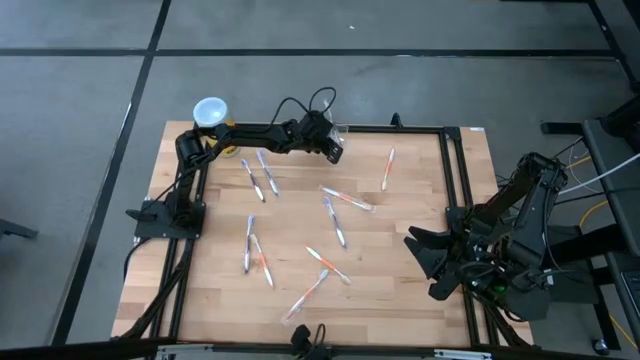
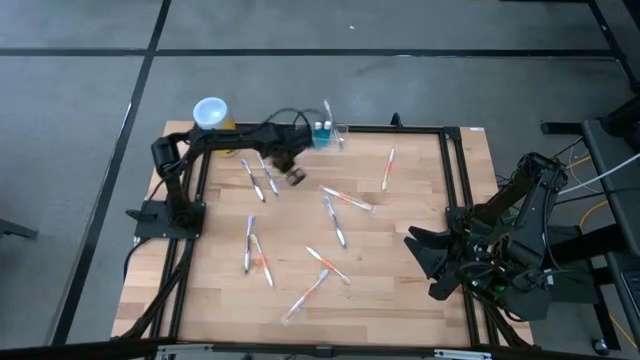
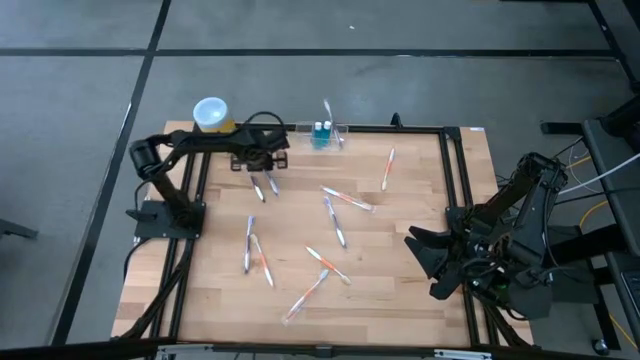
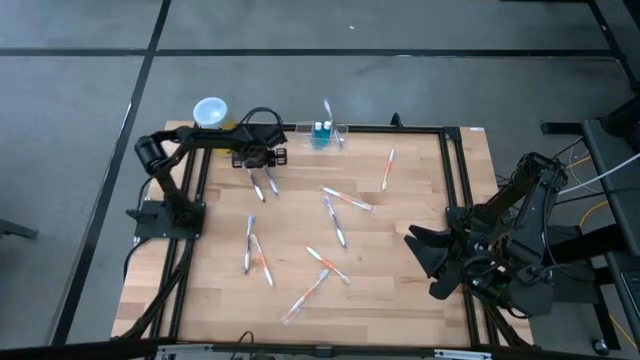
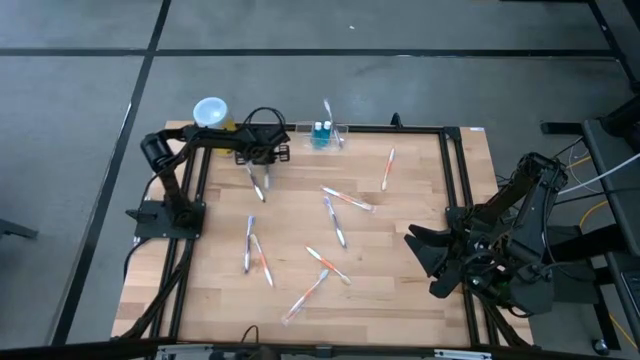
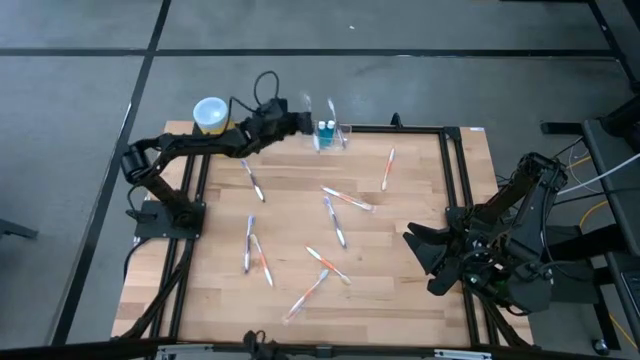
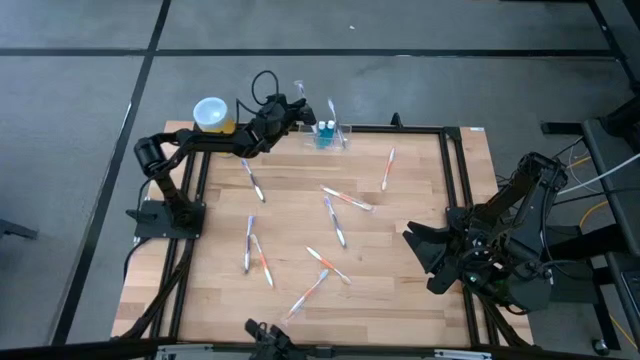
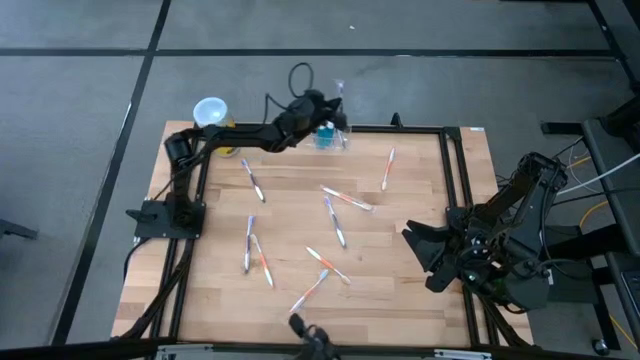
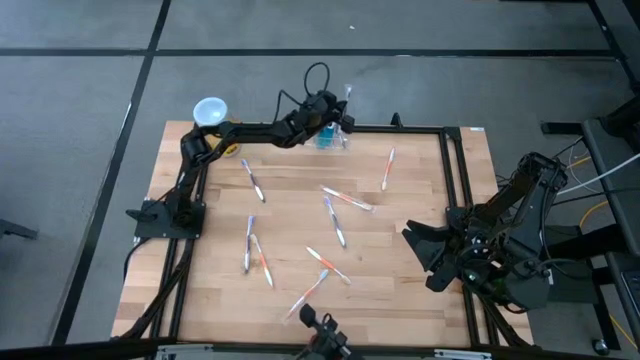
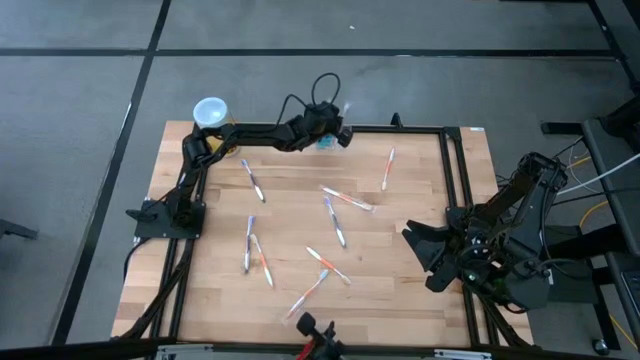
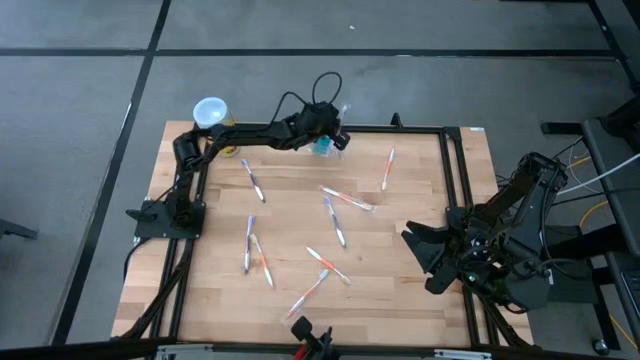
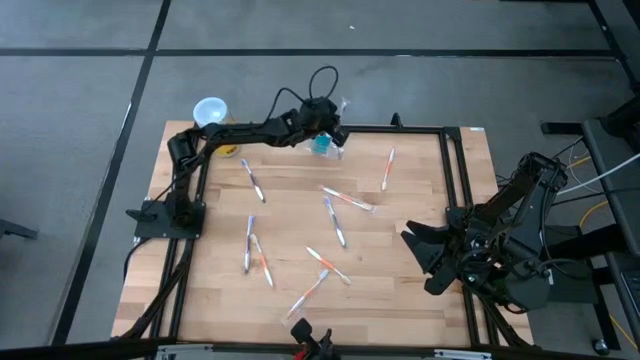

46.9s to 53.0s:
Task: Pick & Place toothbrushing station
Put the purple toothbrush into the right section of the transparent organizer

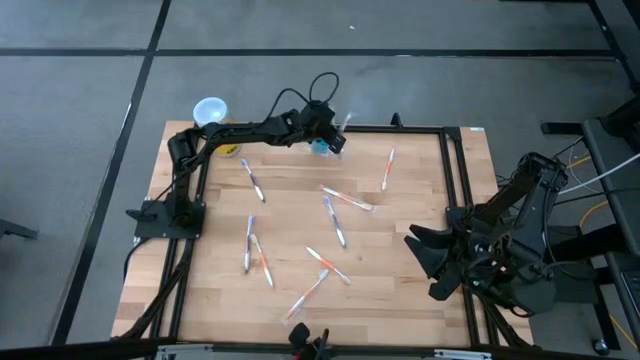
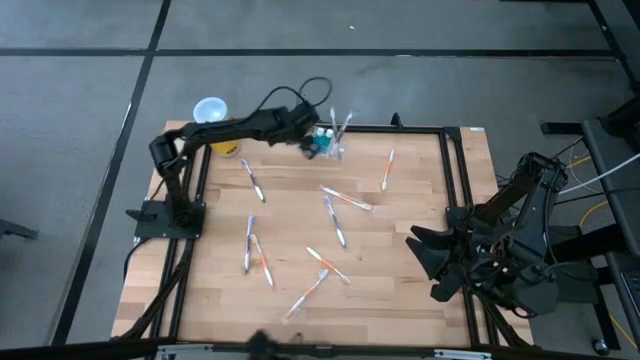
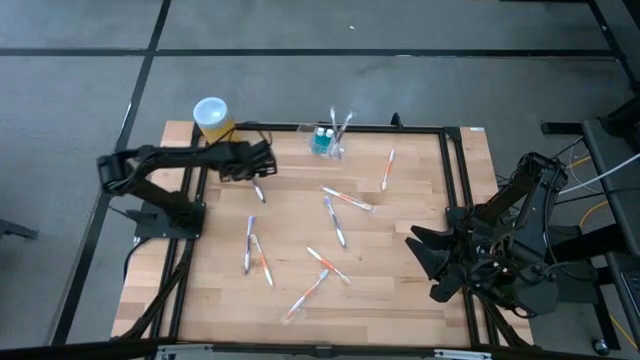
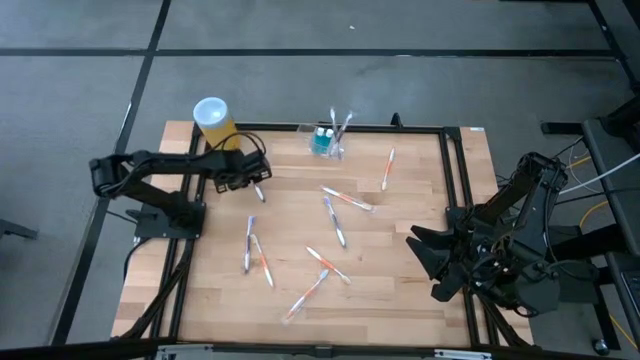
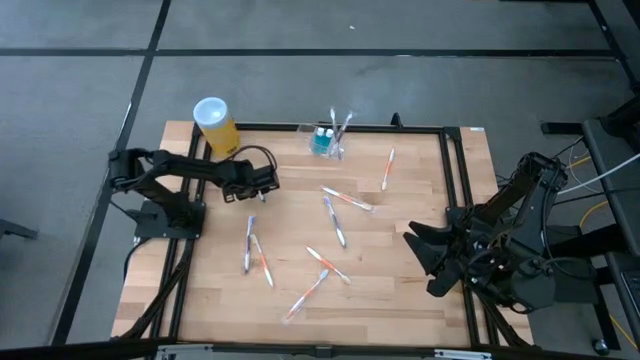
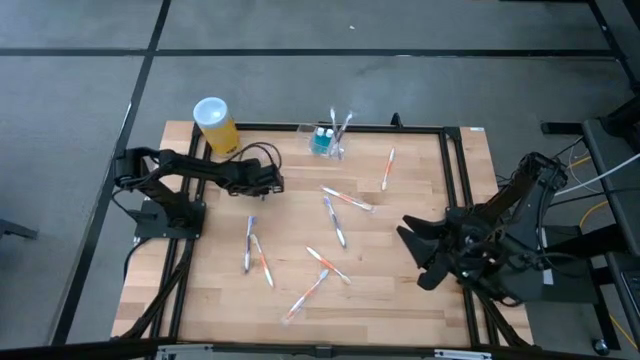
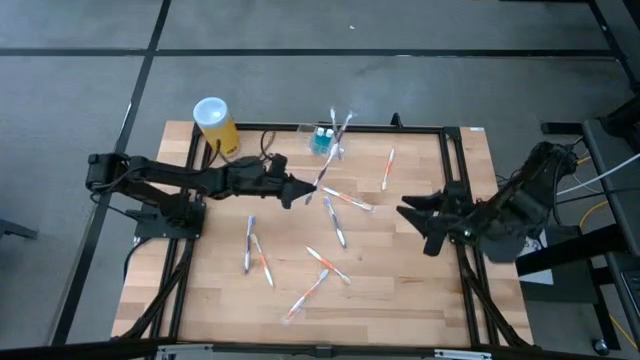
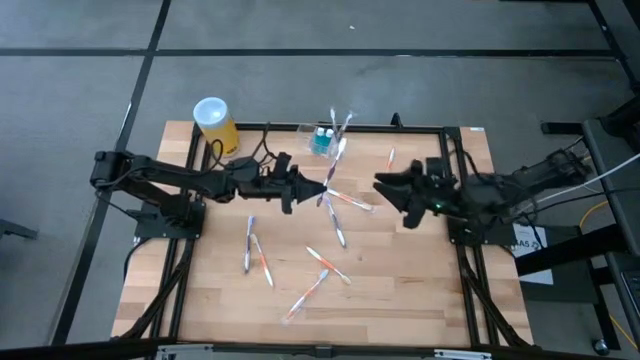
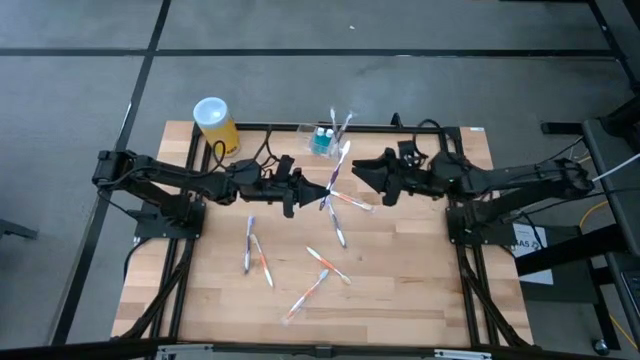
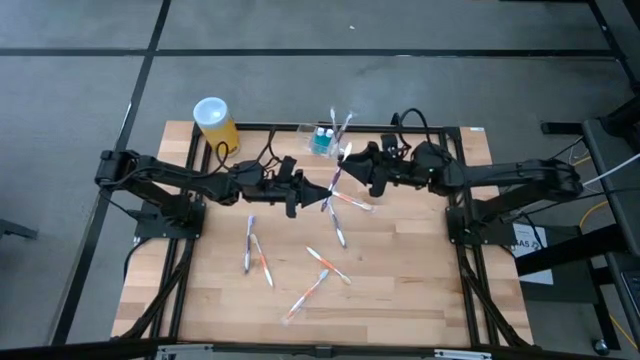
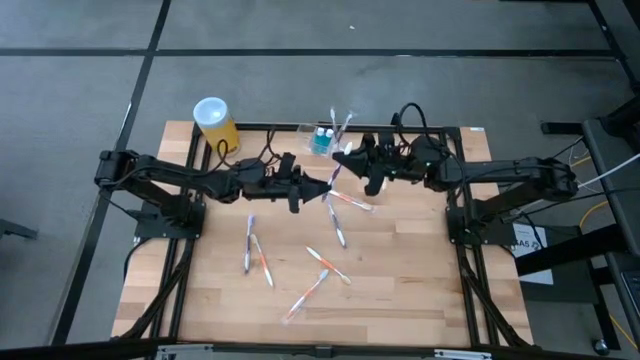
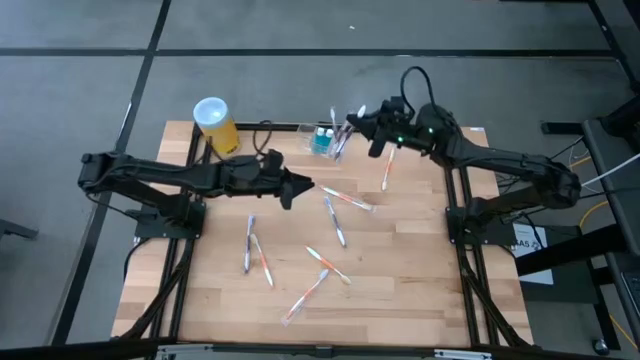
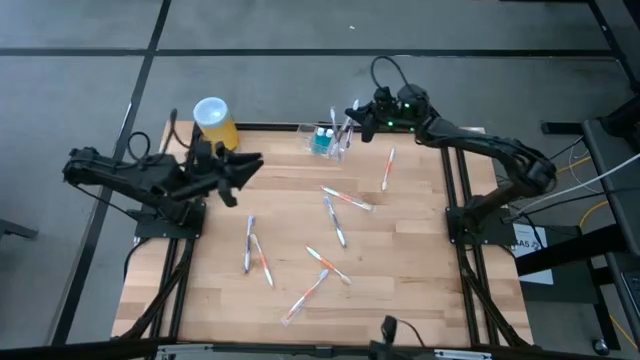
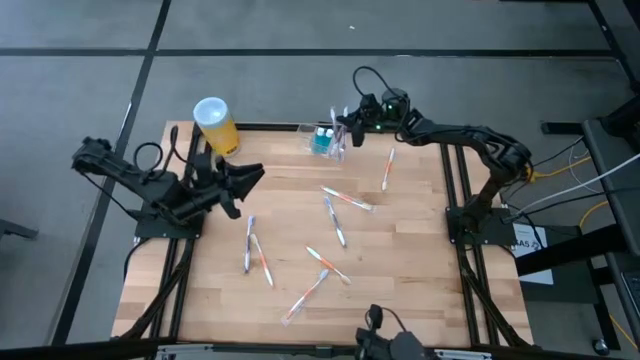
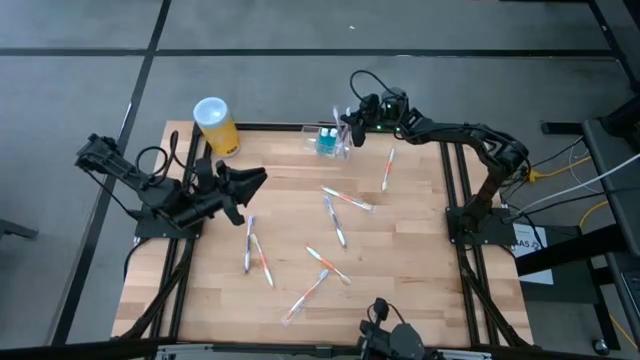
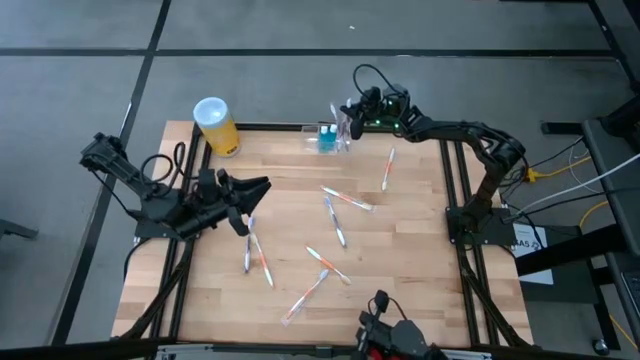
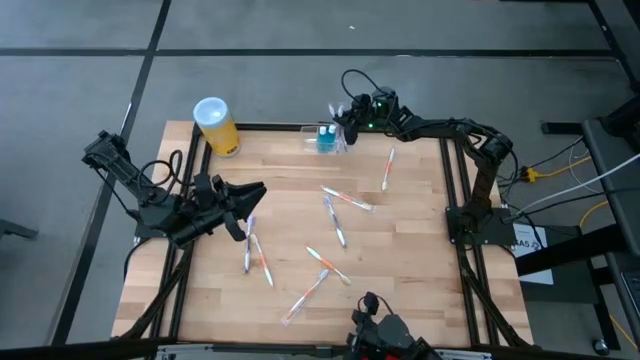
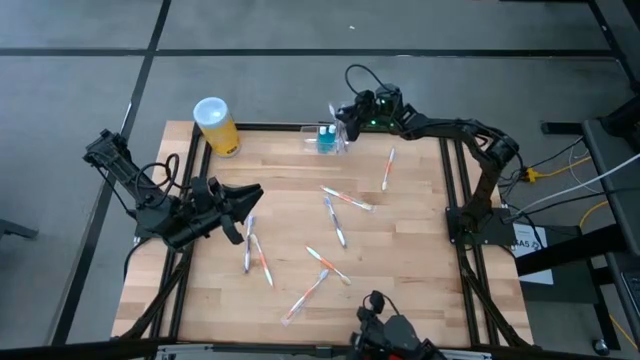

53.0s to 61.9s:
Put the purple toothbrush into the right section of the transparent organizer

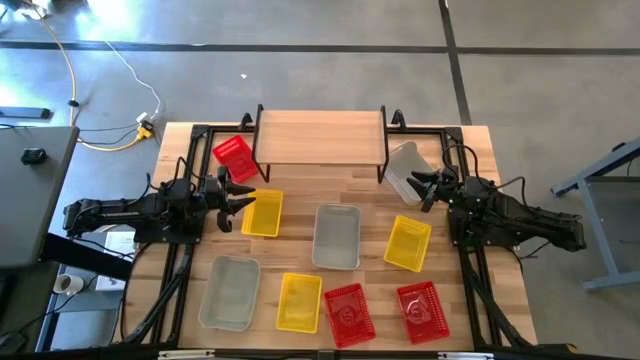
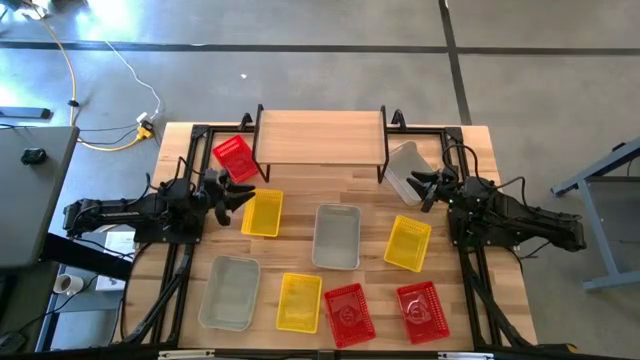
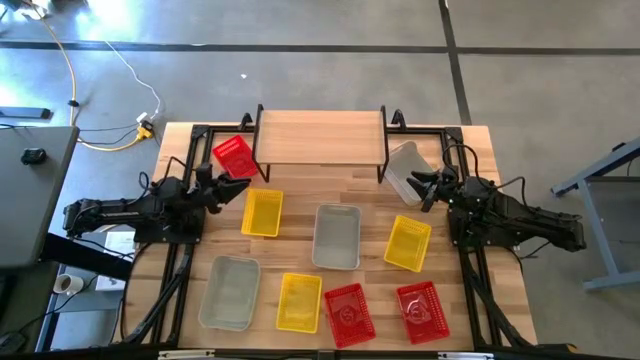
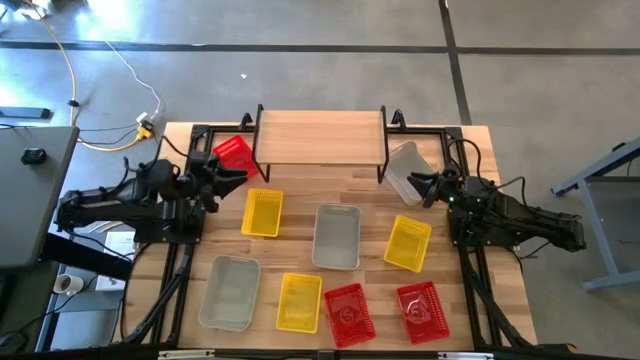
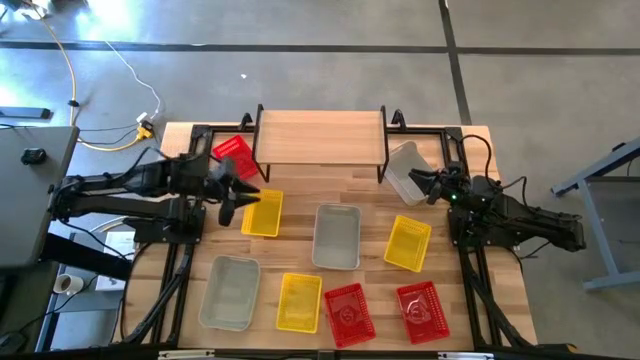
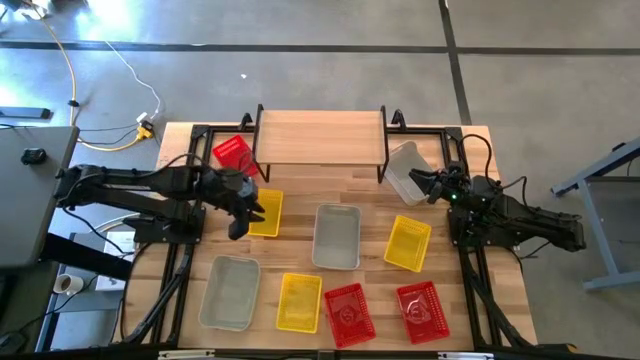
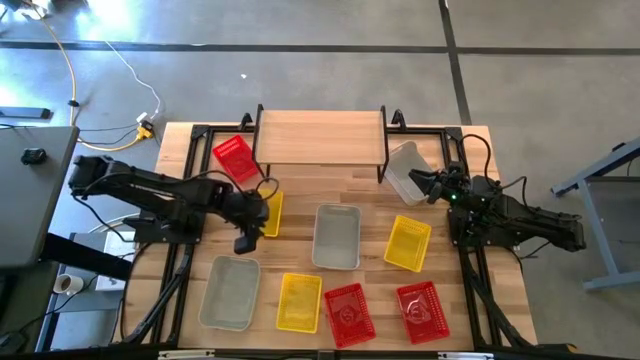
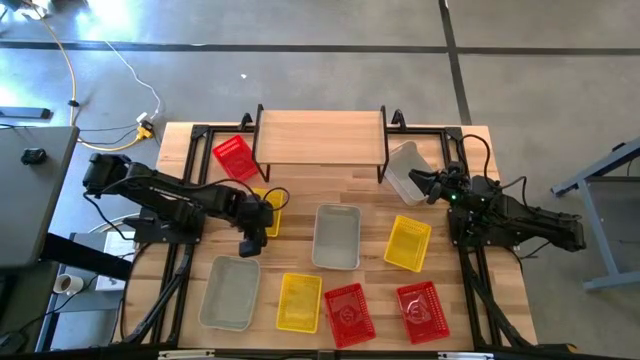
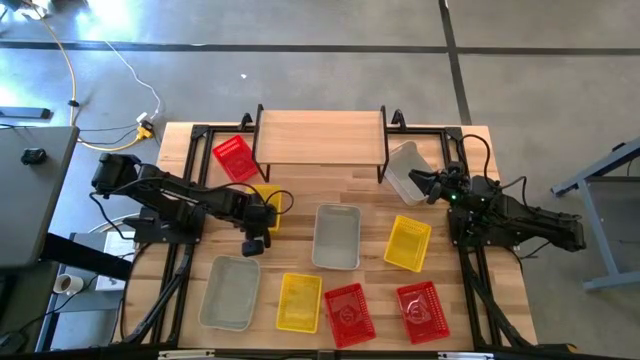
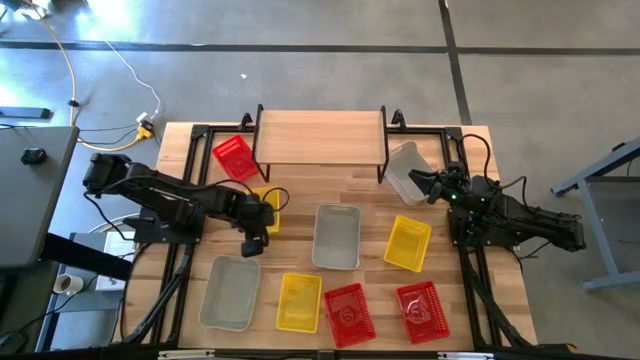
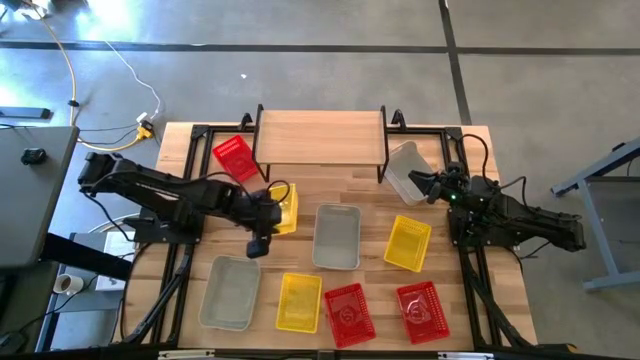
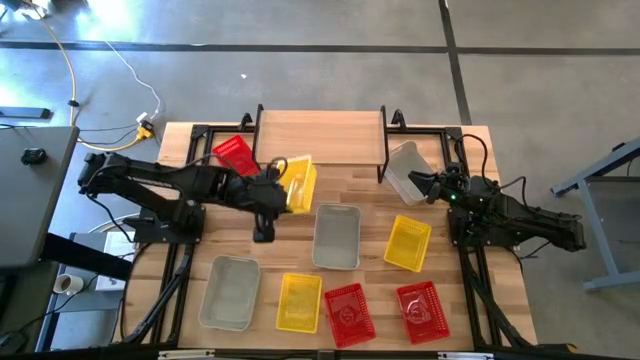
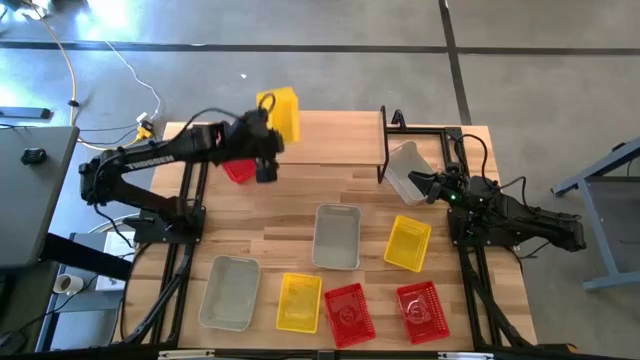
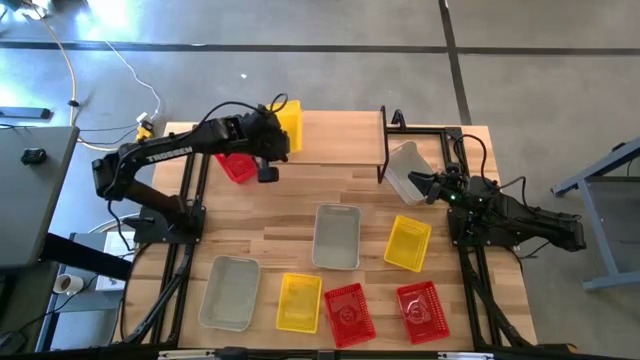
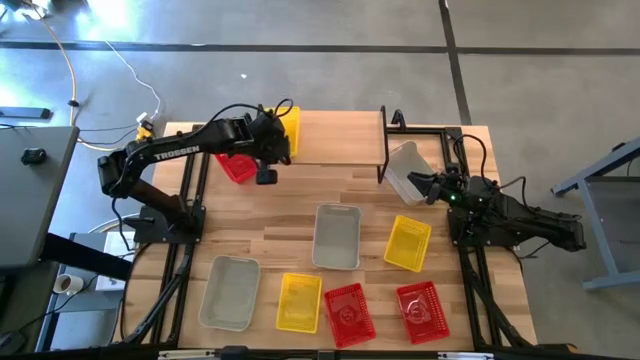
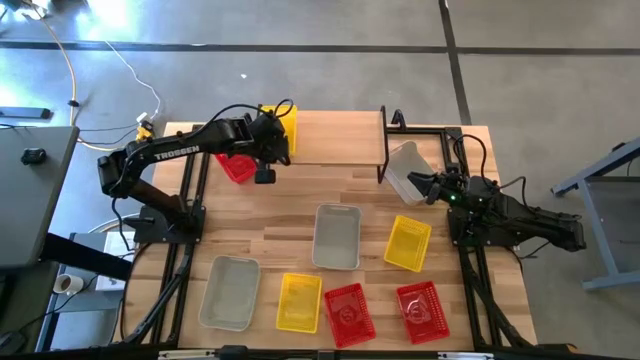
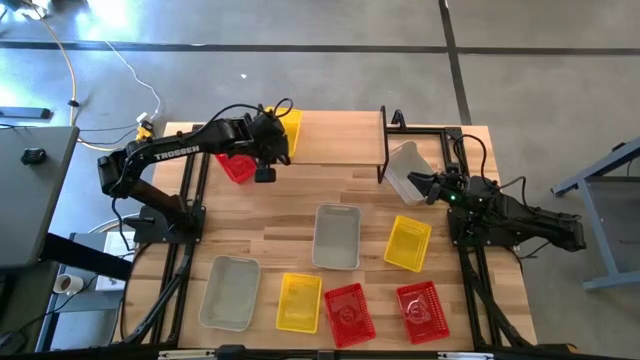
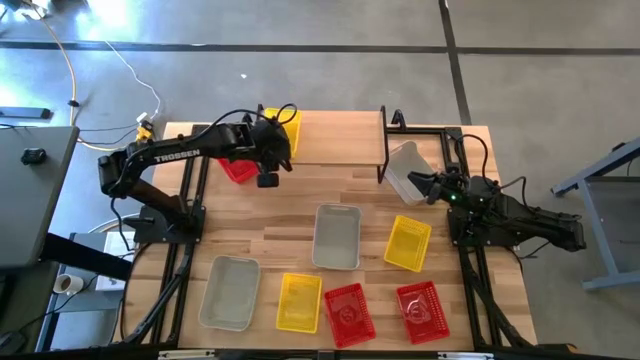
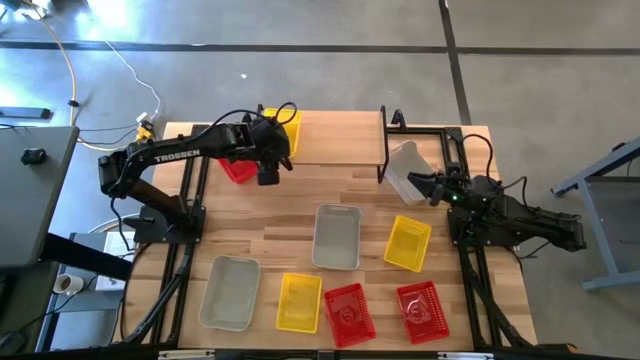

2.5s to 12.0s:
Task: Stack baskets on shelf by color
Put the top left yellow bin on the shelf
